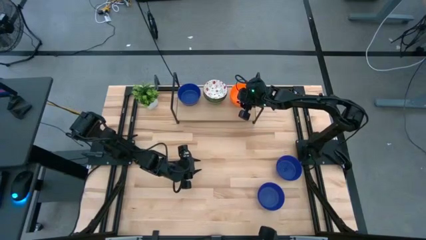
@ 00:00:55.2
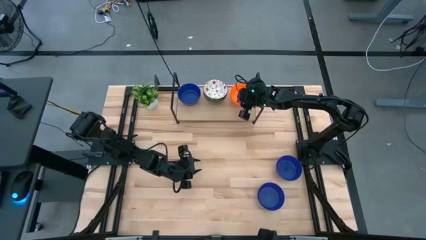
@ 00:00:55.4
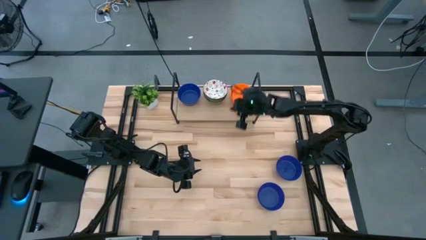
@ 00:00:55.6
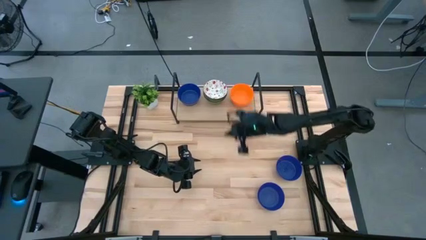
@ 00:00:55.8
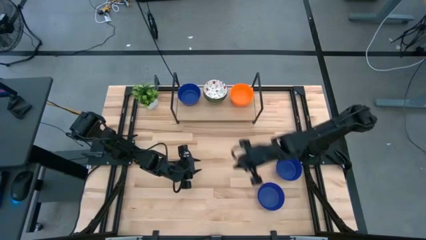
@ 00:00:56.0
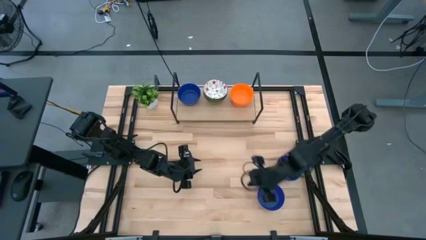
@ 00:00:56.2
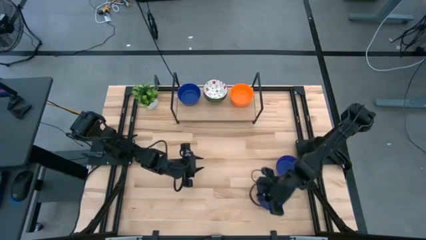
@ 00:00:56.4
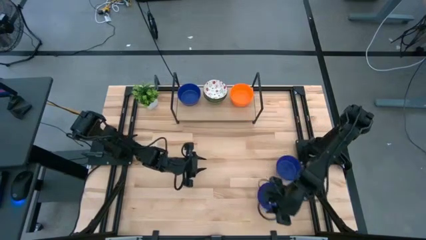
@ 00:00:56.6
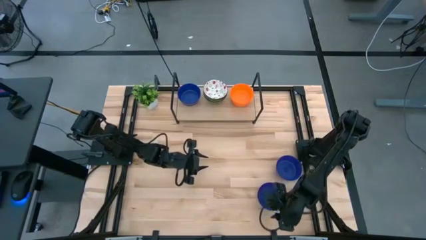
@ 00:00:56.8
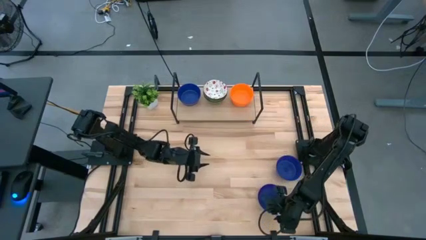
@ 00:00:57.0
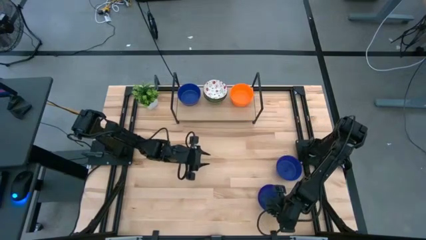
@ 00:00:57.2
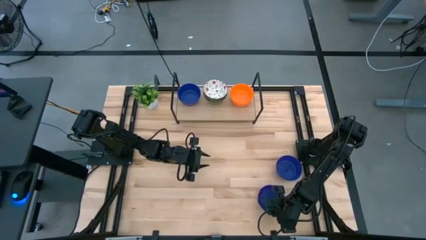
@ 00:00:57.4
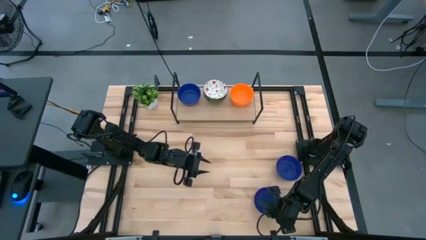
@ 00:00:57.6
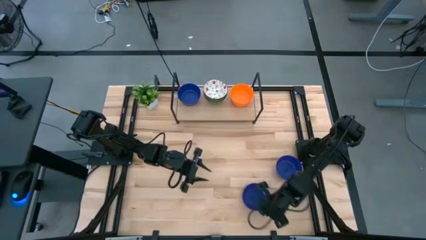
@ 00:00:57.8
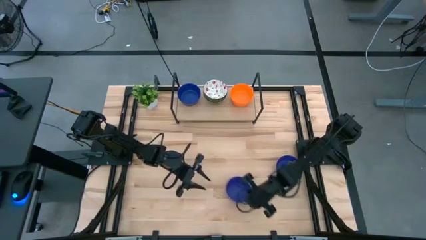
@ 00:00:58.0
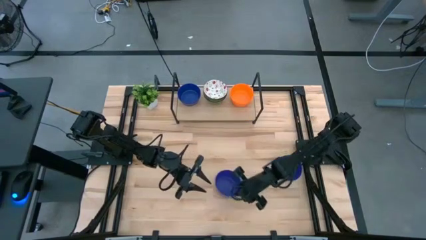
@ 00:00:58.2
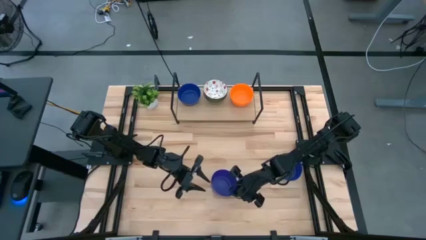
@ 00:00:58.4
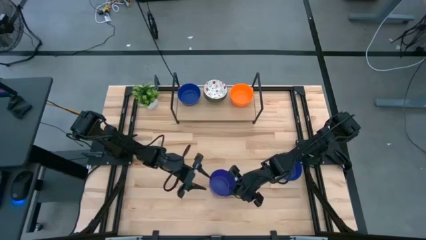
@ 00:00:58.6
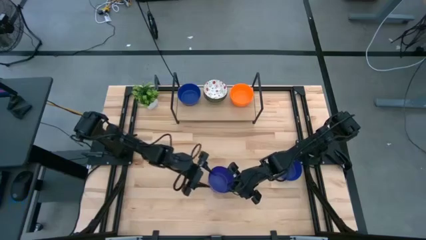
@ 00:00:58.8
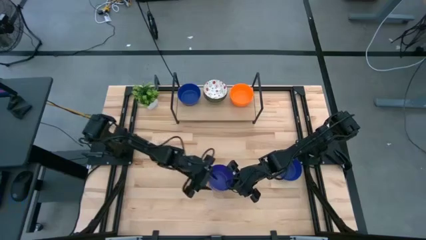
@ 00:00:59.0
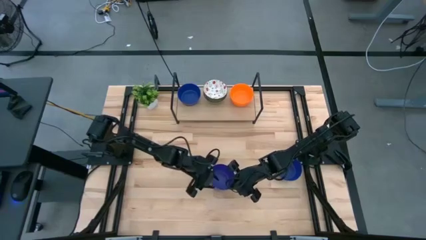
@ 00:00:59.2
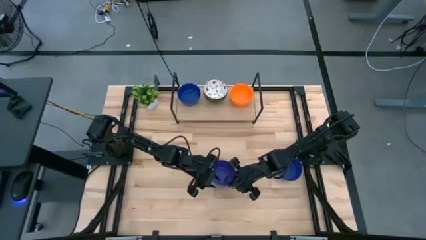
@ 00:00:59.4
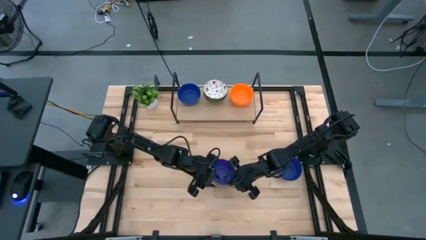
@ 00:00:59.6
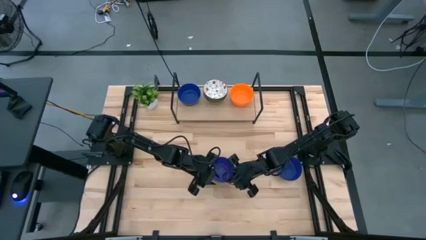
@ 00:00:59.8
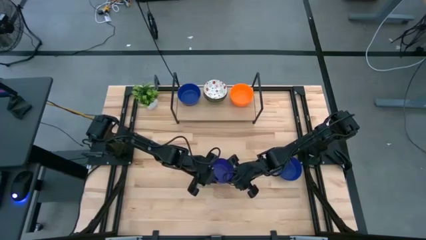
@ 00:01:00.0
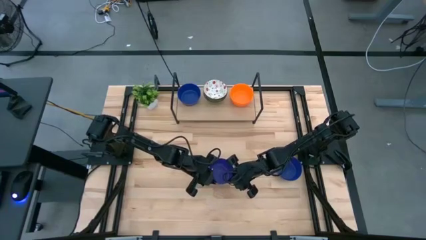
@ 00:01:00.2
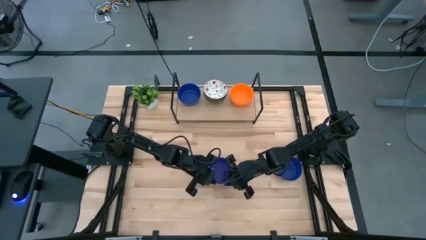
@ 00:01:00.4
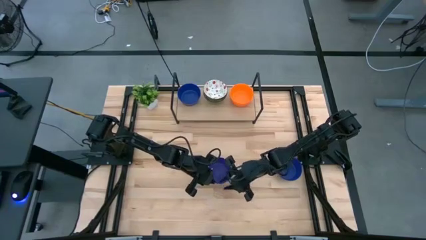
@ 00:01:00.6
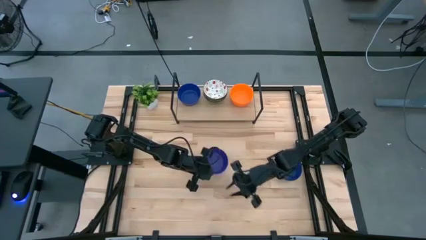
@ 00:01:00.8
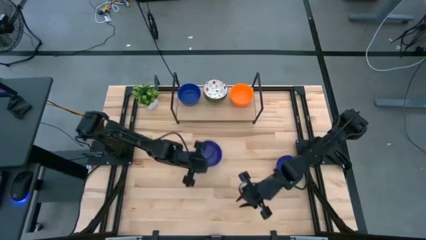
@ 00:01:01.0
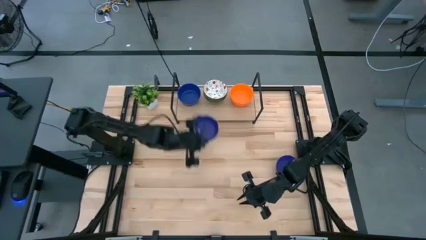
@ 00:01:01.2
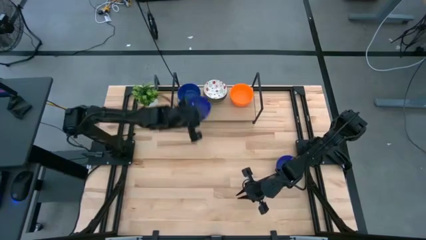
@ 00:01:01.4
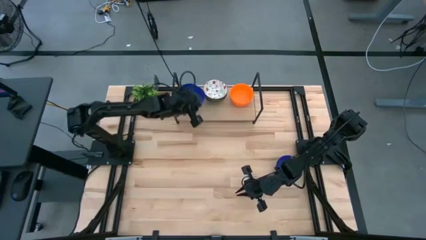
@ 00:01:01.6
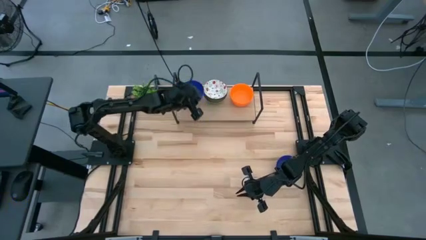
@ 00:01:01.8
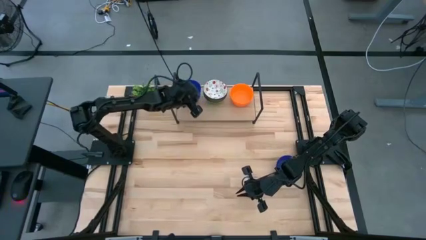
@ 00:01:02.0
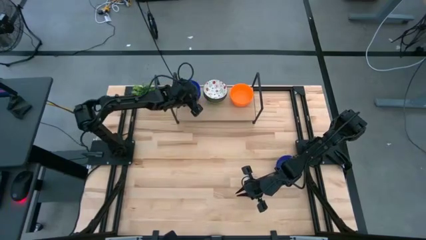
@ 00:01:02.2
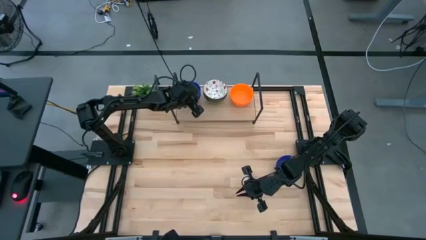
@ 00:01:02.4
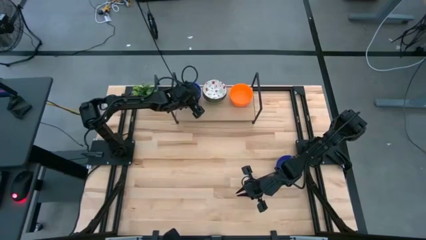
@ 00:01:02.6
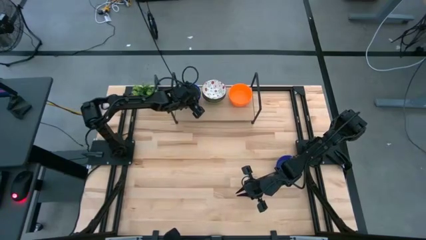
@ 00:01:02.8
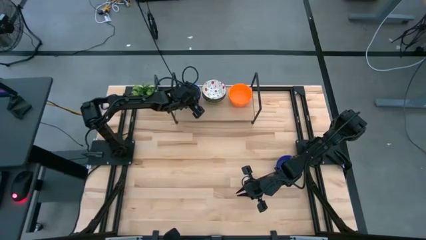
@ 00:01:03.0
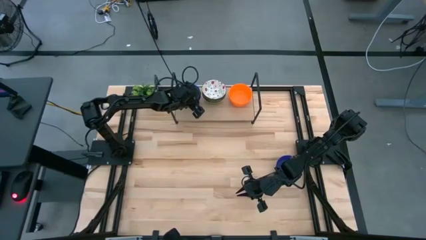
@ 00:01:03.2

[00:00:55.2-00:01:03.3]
Task: Pick & Place Mini bowls
Stack the blue bowl on top of the blue bowls on the shelf

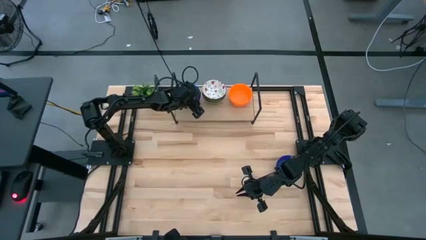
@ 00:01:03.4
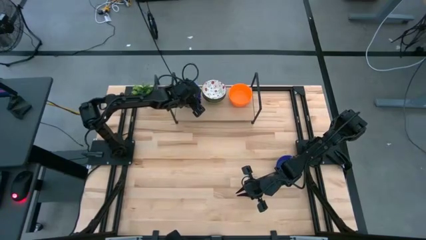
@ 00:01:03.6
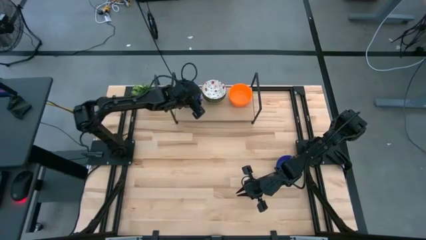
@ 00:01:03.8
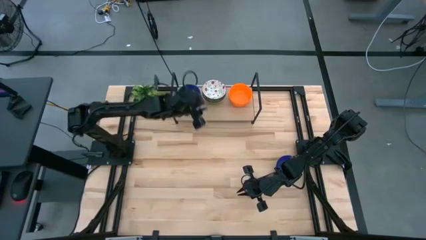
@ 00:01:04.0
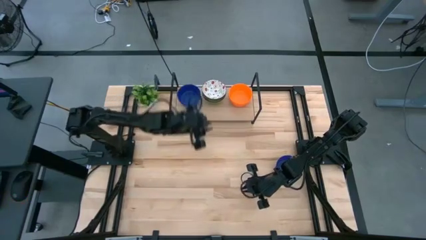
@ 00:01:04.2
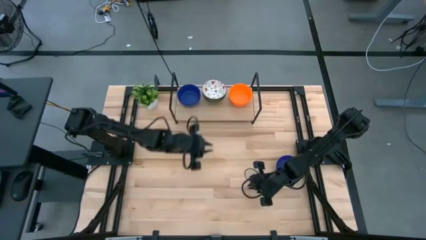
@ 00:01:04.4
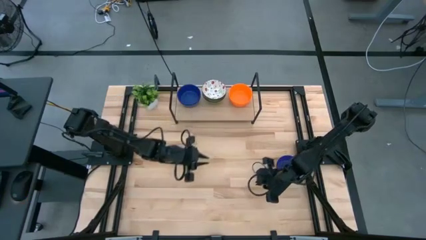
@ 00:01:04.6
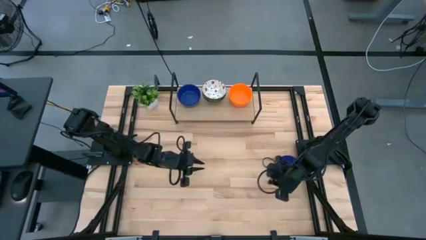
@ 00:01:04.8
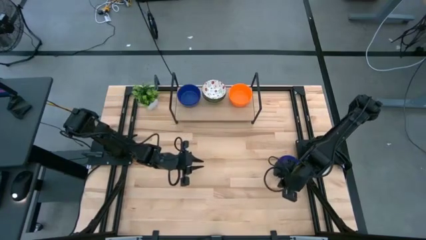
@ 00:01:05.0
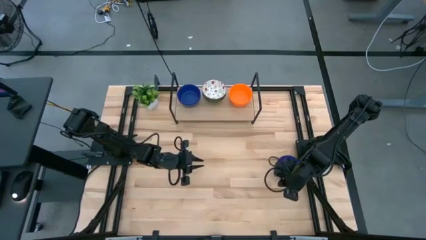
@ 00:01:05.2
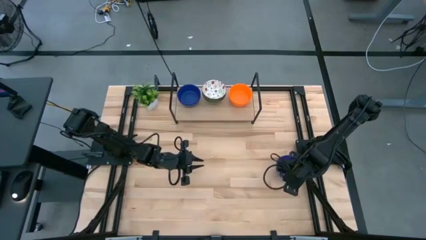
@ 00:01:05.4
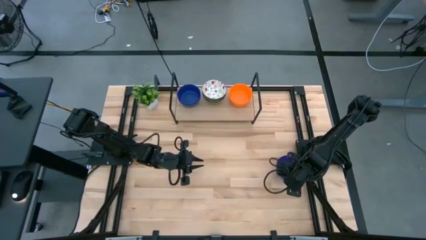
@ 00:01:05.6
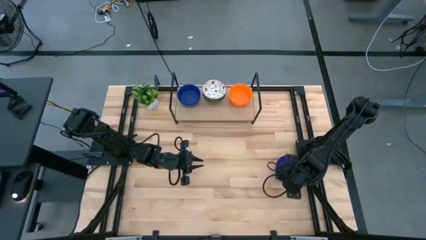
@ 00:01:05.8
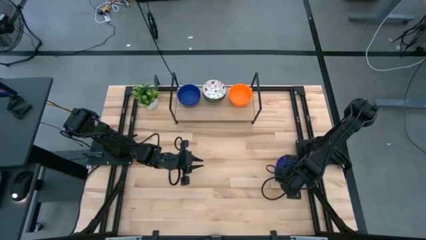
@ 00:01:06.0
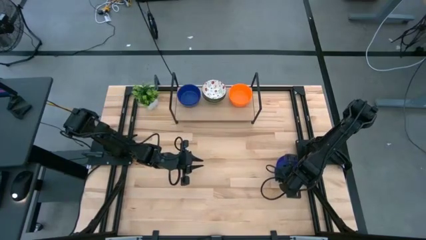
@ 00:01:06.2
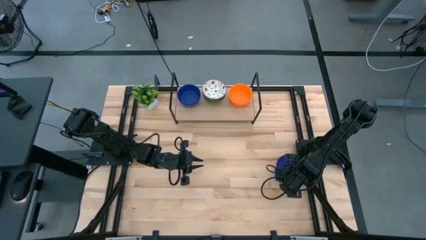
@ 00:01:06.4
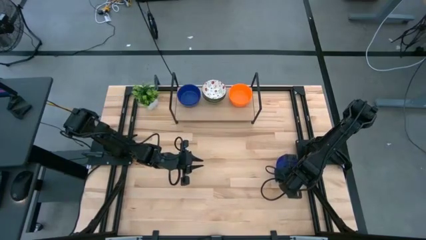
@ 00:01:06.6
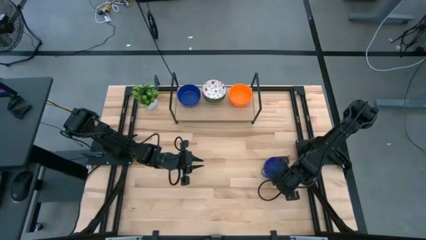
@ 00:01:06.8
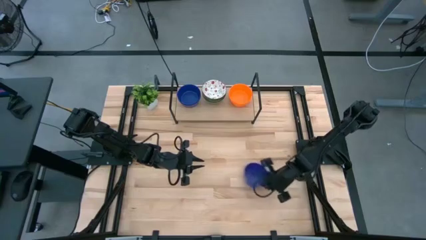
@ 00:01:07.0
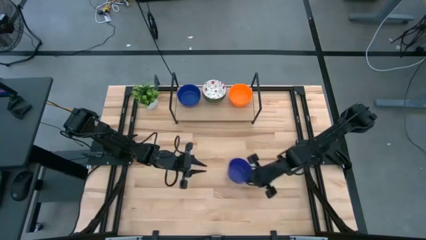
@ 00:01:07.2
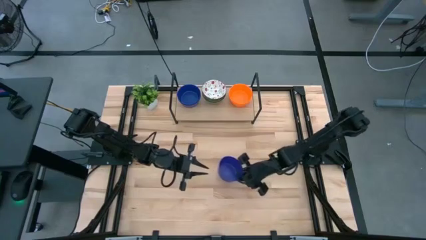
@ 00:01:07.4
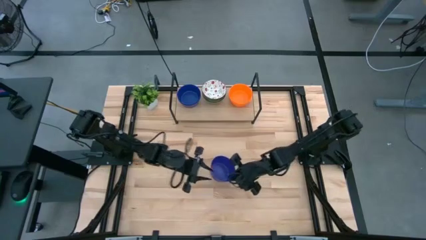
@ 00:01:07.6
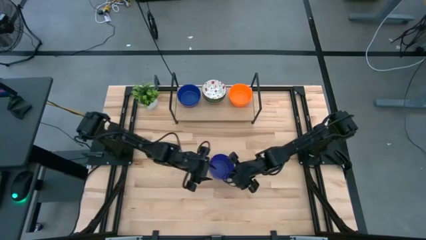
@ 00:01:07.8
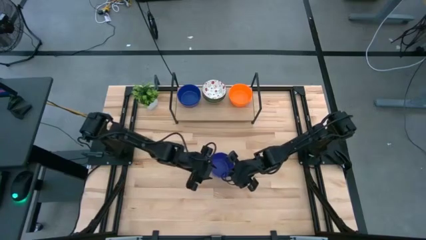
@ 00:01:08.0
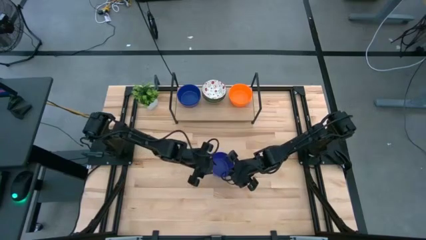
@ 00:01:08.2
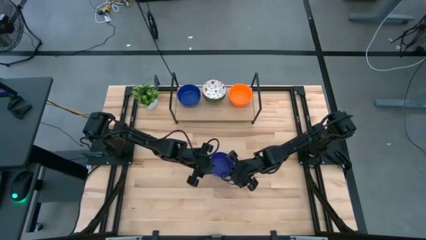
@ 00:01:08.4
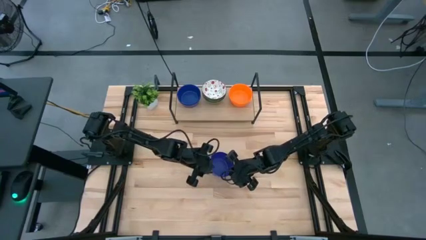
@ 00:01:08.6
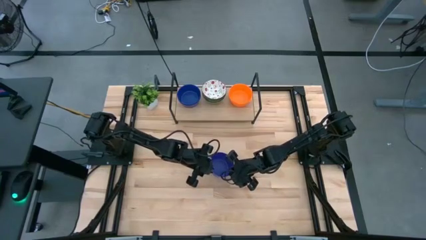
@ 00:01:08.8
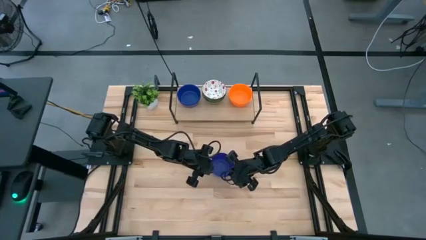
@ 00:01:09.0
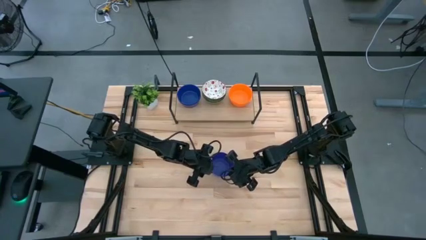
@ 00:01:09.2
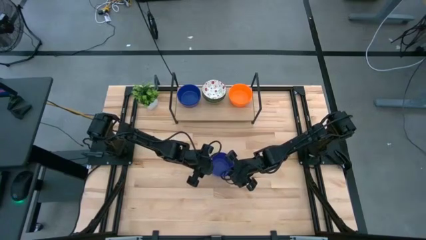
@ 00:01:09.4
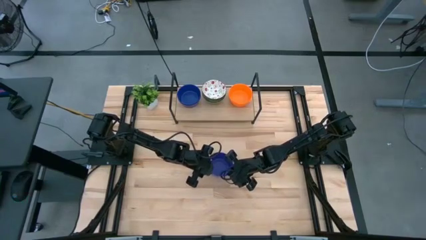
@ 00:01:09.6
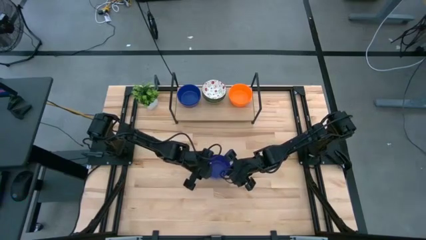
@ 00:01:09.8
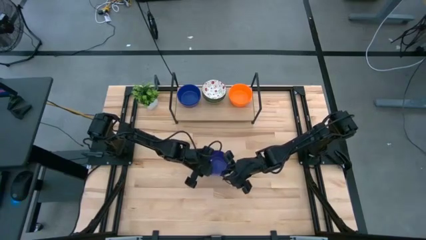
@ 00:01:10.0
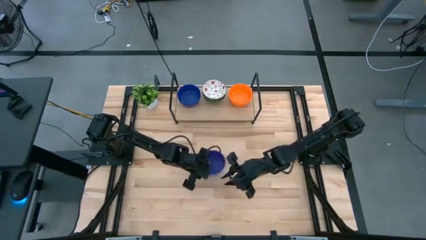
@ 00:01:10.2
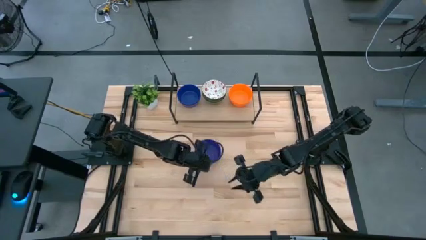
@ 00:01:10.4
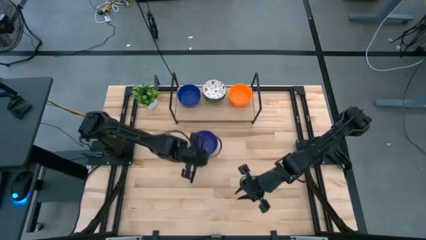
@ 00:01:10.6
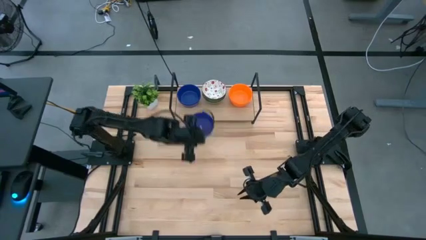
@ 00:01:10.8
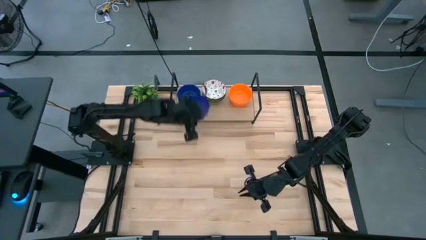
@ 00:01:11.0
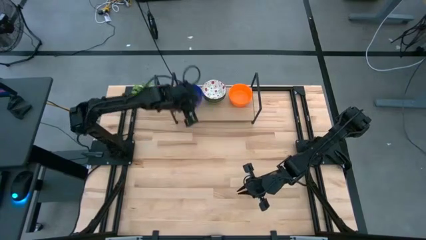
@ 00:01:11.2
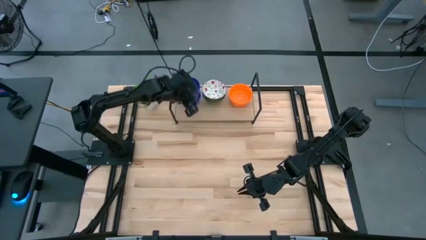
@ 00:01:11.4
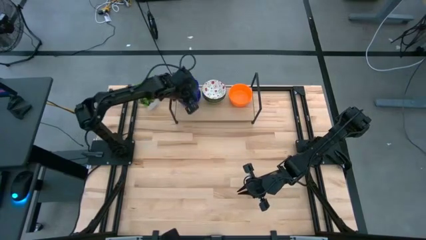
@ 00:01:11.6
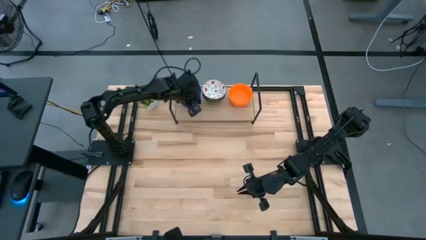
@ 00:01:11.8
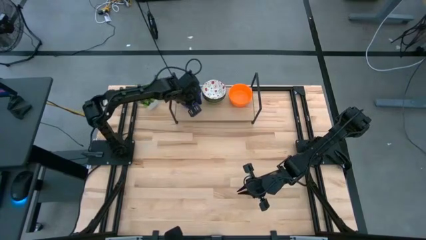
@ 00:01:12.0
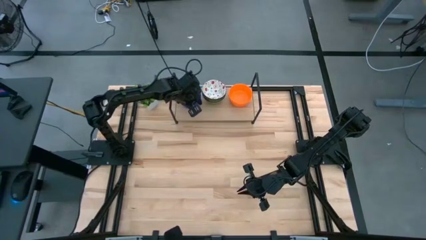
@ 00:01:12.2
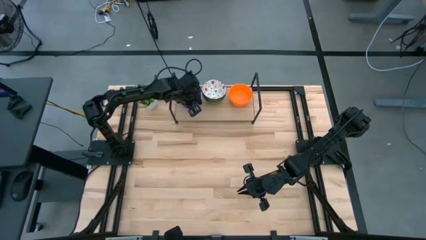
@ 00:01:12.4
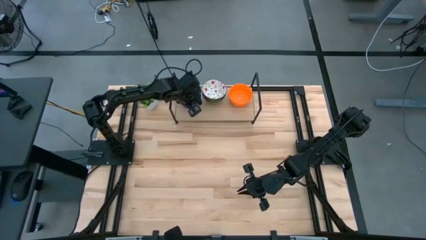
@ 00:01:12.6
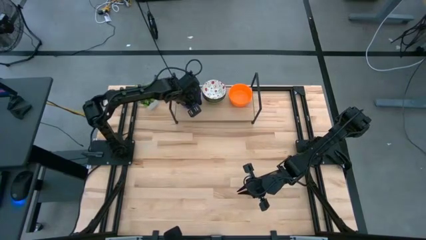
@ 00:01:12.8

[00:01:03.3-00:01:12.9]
Stack the blue bowl on top of the blue bowls on the shelf
